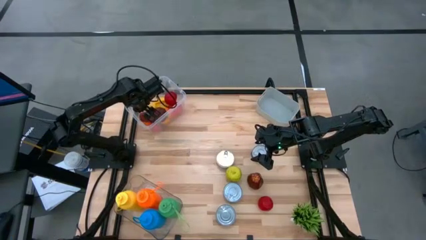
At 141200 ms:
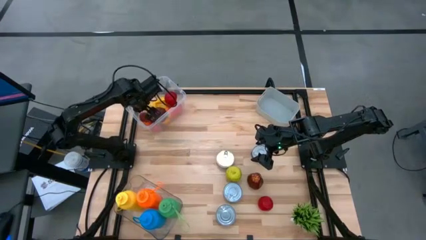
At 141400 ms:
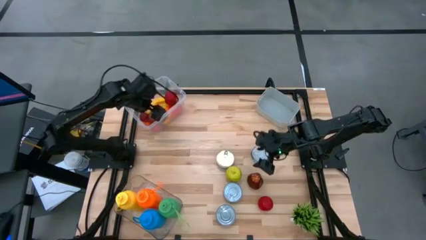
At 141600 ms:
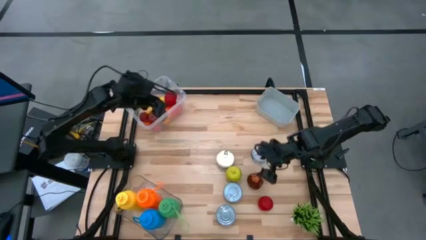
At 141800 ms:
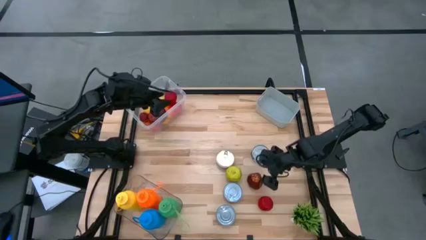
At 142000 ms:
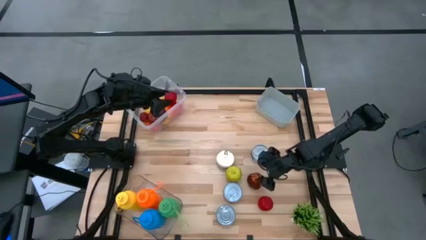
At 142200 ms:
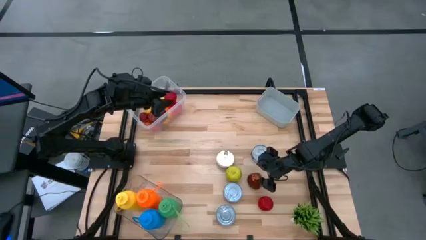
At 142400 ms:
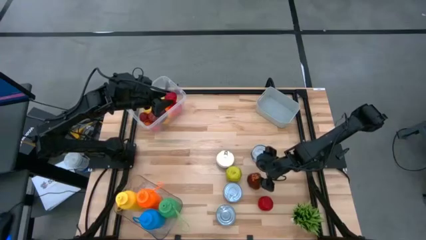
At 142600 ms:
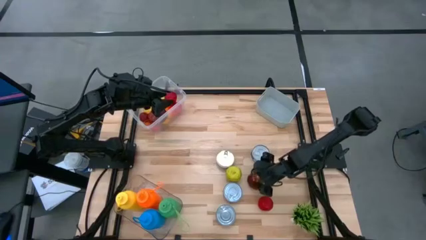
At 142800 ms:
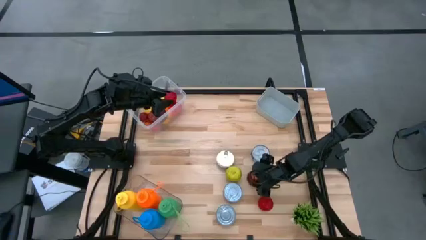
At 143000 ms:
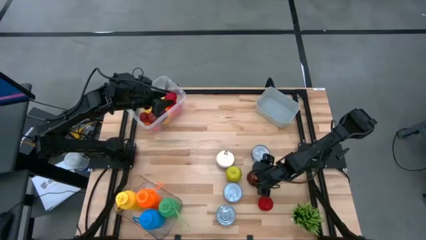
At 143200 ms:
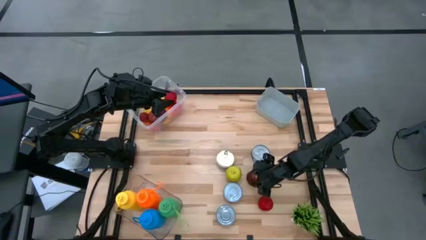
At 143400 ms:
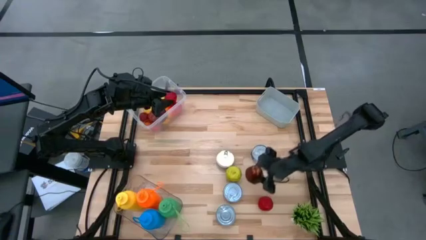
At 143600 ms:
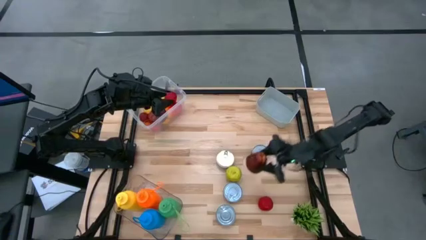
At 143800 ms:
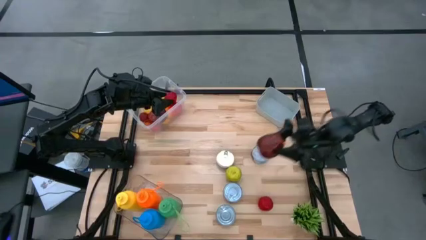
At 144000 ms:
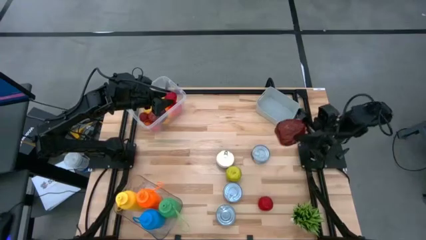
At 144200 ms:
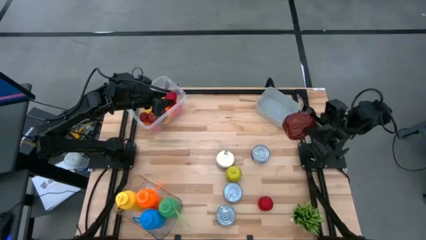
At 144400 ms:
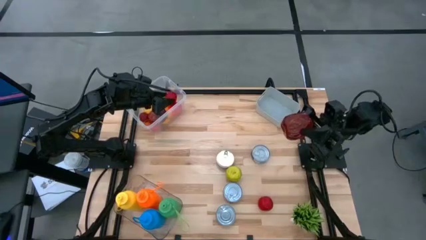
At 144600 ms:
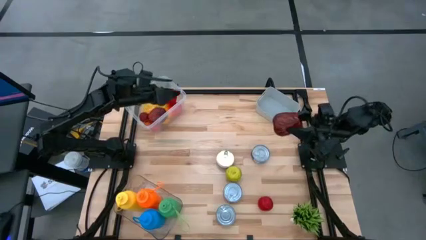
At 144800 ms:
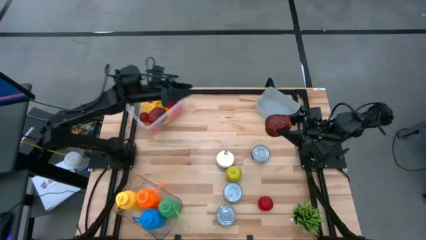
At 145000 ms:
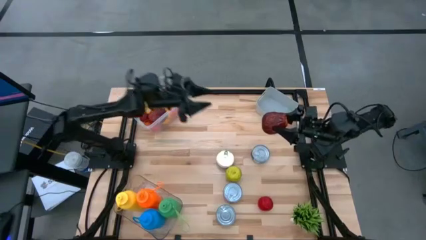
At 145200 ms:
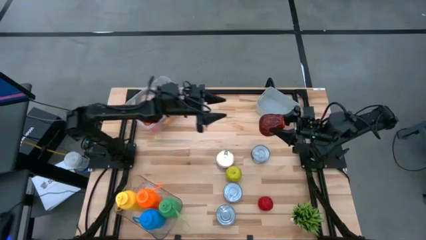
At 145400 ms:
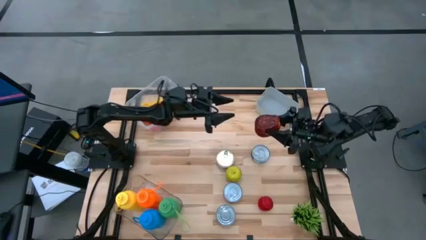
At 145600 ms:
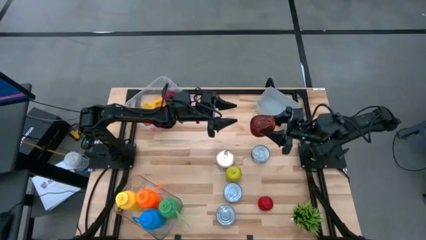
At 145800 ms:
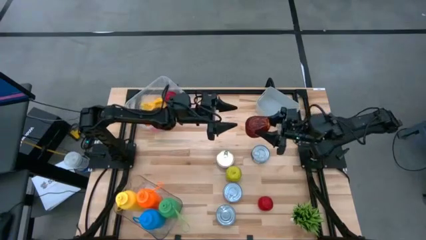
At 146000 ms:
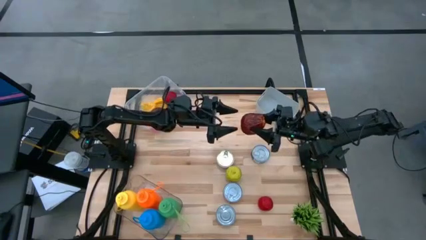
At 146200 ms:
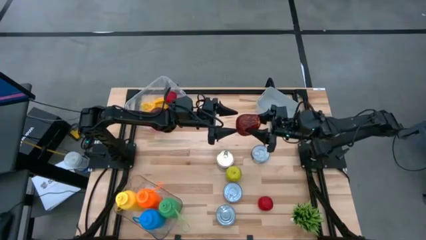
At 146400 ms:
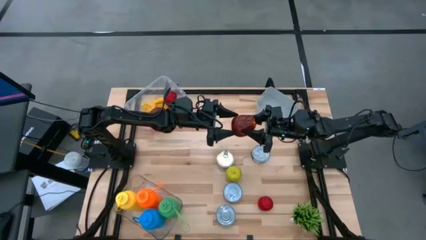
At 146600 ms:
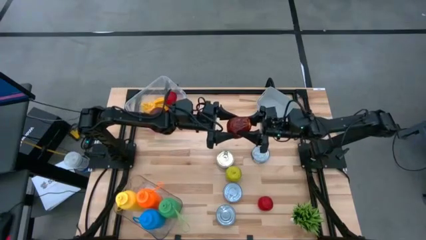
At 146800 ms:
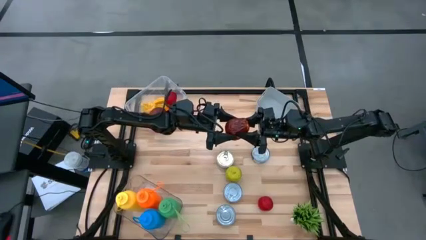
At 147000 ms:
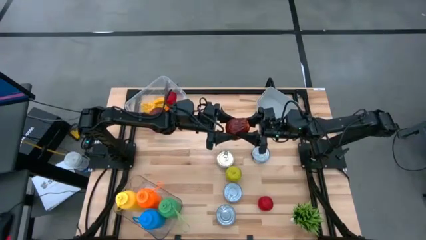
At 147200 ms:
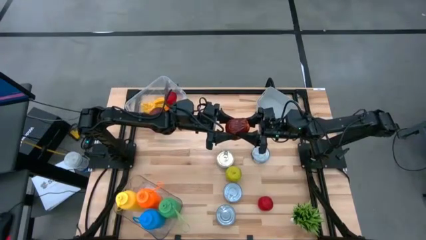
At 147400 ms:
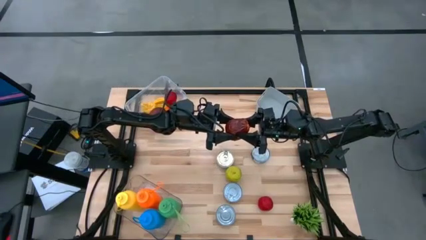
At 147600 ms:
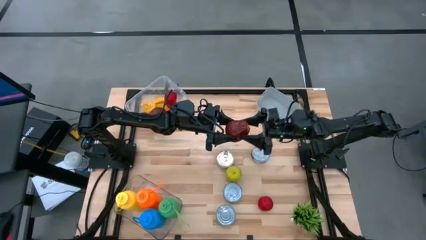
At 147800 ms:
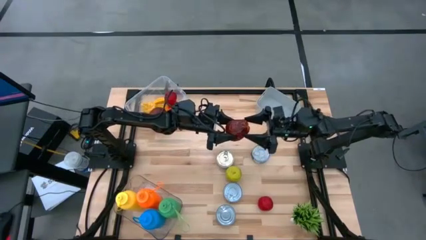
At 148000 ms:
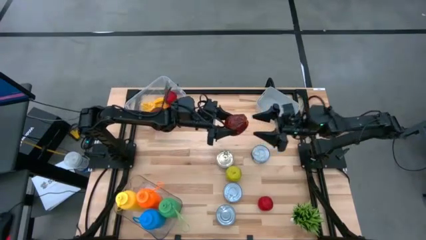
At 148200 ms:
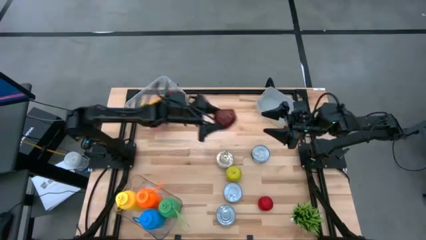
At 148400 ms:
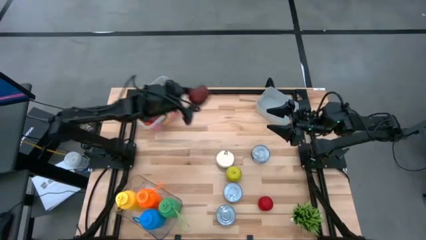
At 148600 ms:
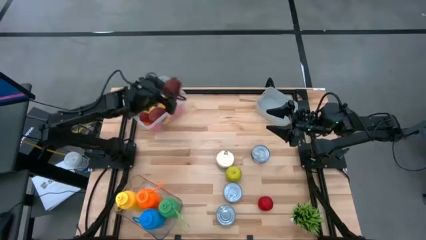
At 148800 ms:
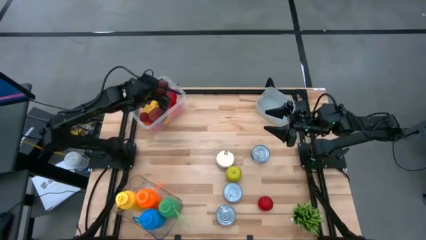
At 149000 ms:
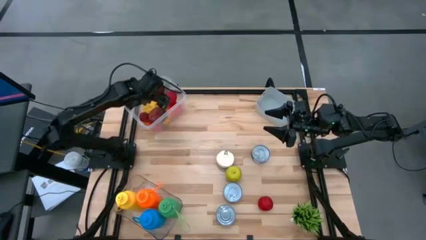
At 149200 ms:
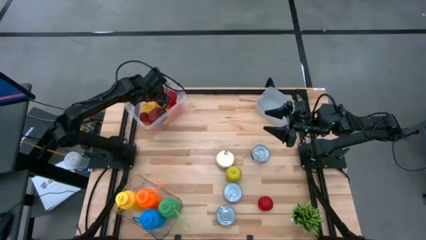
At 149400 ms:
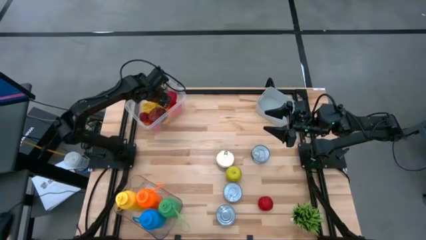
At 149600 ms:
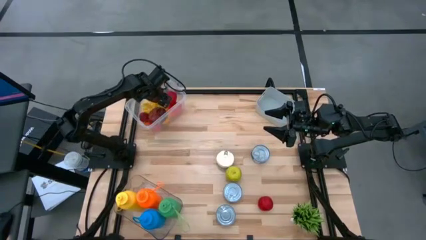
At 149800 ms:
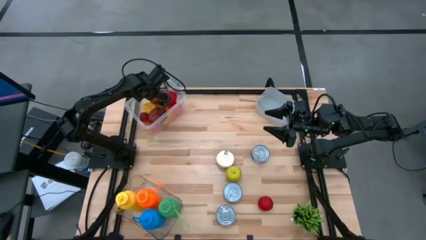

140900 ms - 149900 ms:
Task: Pick & Place Food Item
Put the red apple into the white bin

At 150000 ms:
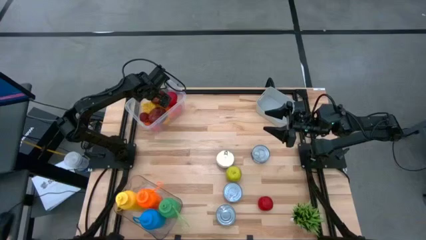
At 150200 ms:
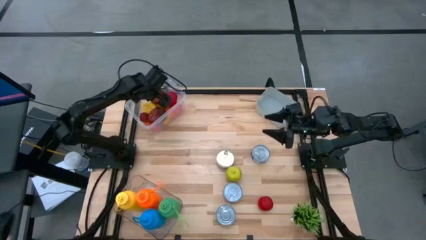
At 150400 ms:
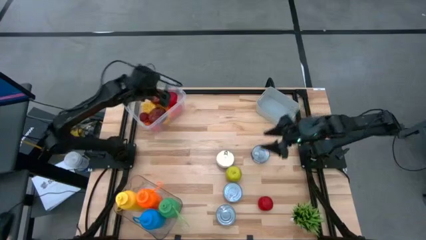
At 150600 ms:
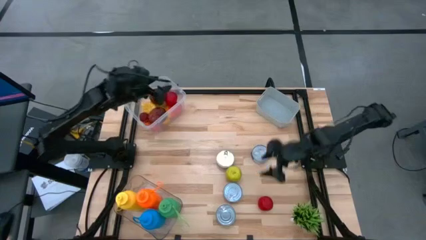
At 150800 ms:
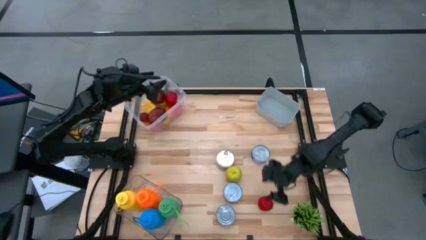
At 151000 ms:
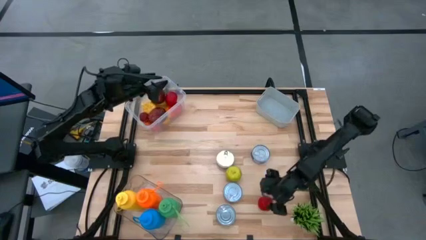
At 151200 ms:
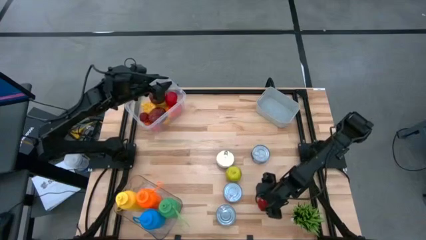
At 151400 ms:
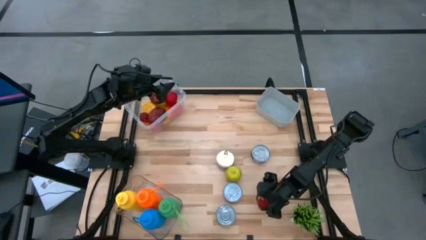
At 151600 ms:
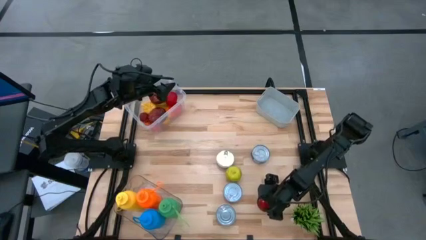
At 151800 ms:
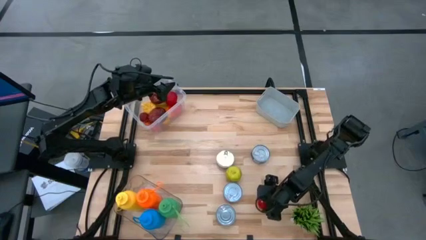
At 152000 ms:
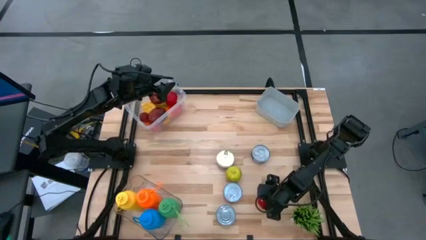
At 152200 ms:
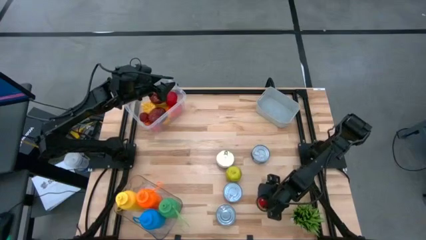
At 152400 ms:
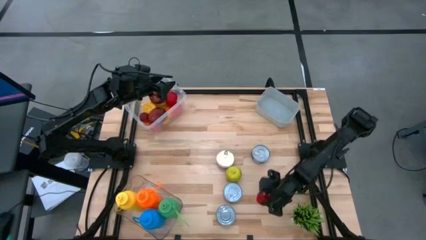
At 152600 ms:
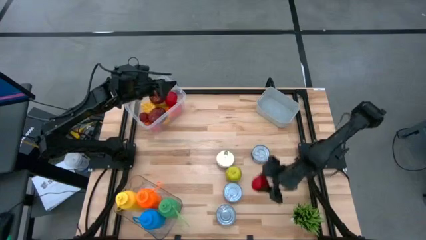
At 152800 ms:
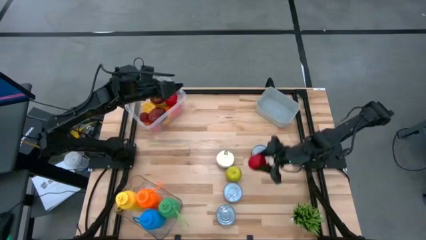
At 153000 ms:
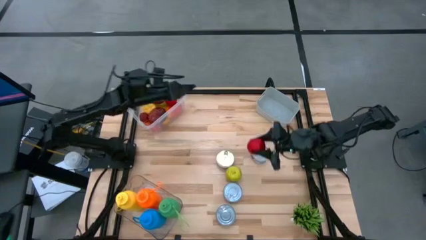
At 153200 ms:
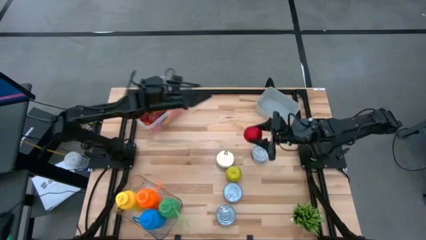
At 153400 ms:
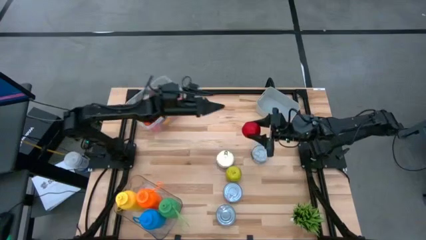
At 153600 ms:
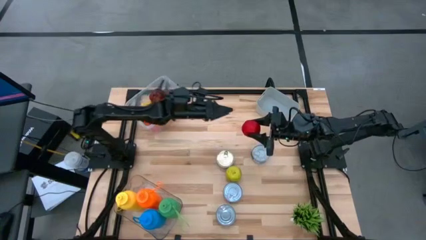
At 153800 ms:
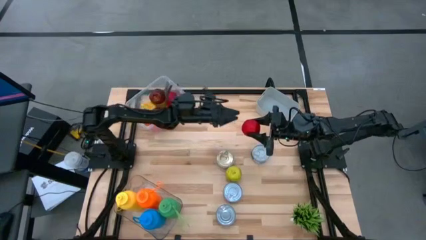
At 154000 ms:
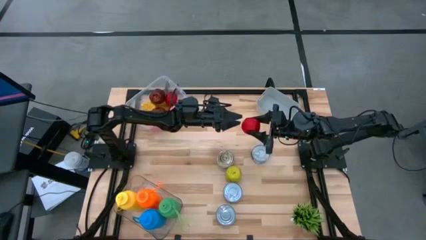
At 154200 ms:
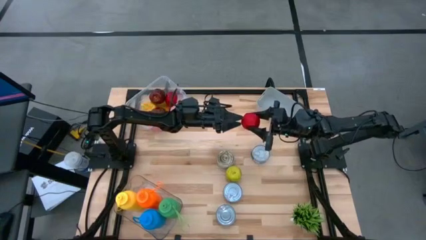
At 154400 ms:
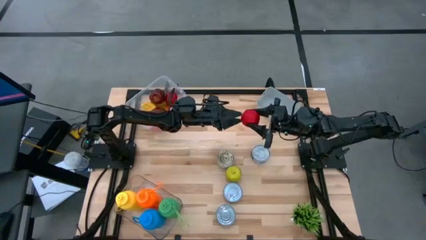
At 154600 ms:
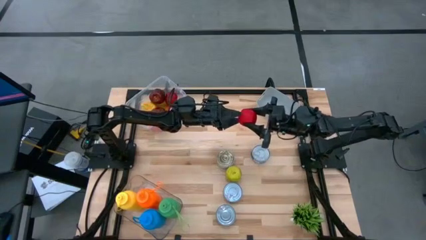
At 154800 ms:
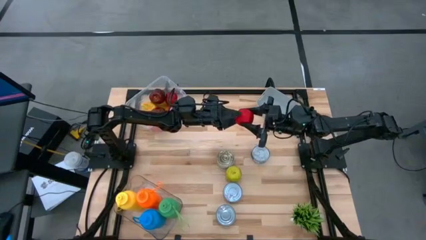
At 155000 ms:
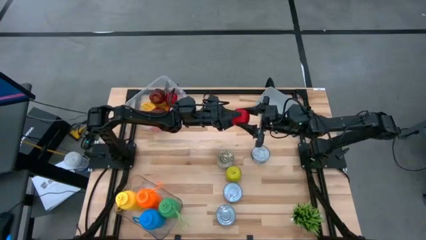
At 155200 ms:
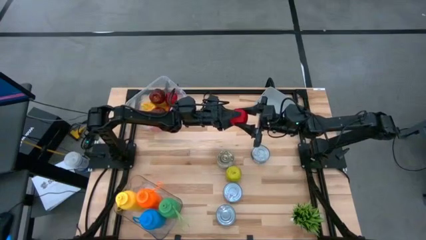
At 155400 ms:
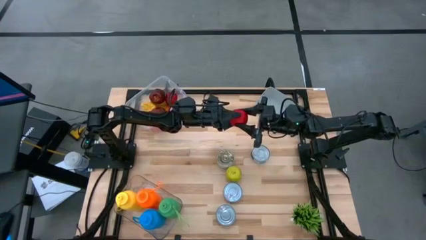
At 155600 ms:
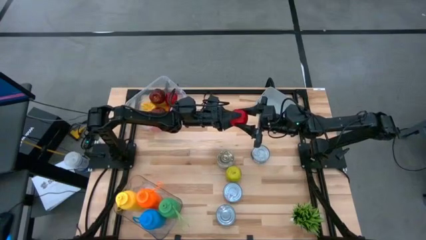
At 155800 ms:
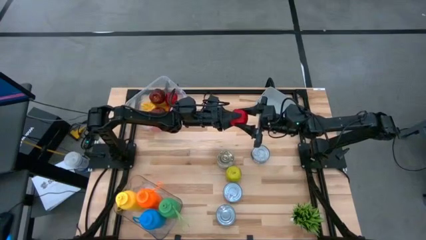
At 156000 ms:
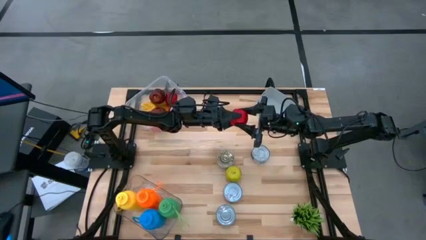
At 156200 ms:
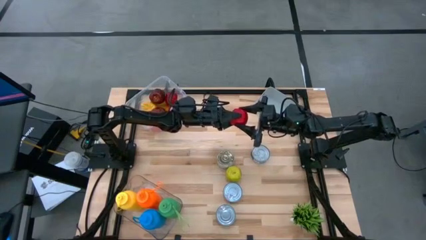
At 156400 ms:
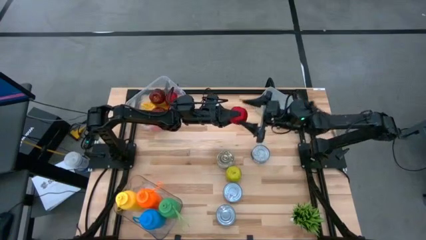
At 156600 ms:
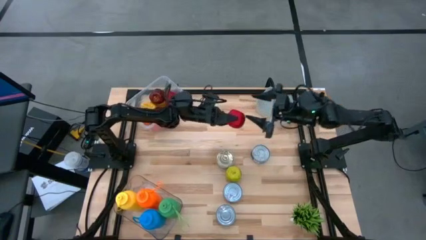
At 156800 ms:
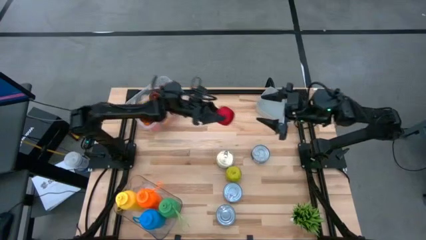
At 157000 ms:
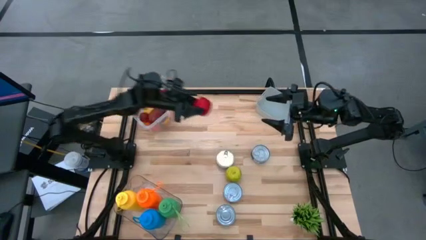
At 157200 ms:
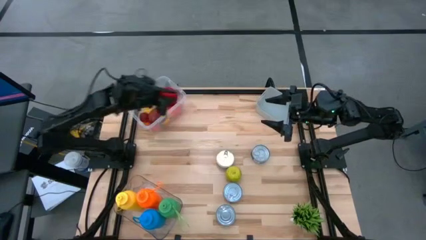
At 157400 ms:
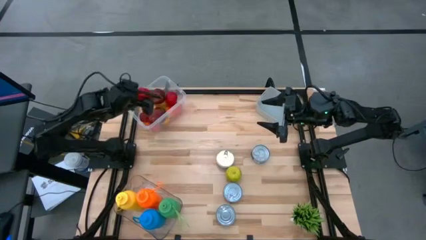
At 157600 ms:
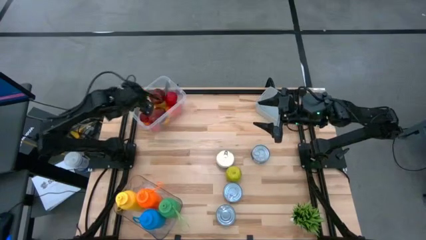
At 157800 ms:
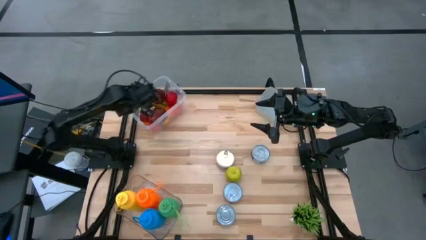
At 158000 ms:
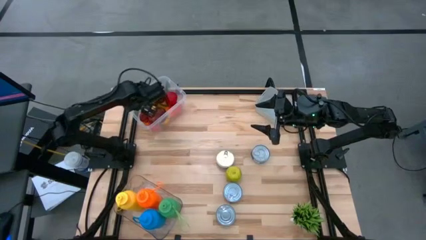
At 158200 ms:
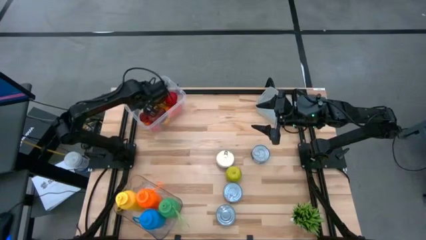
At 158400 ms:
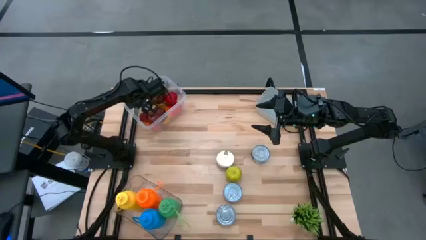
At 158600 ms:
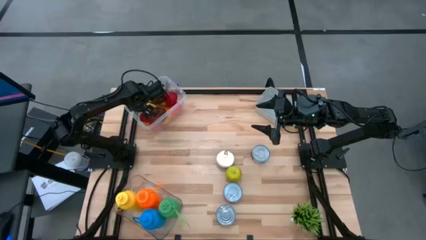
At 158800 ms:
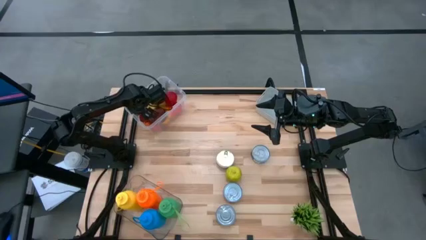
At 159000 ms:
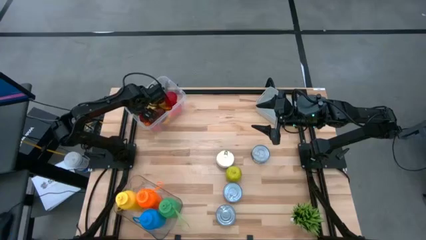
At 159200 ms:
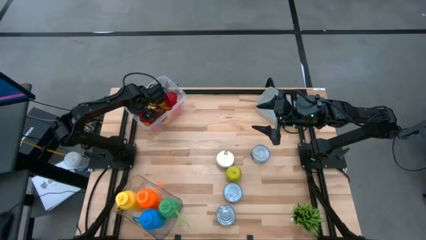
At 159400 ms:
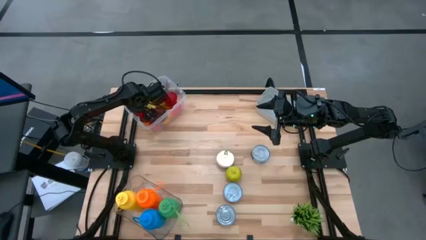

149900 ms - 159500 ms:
Put the red tomato into the white bin
